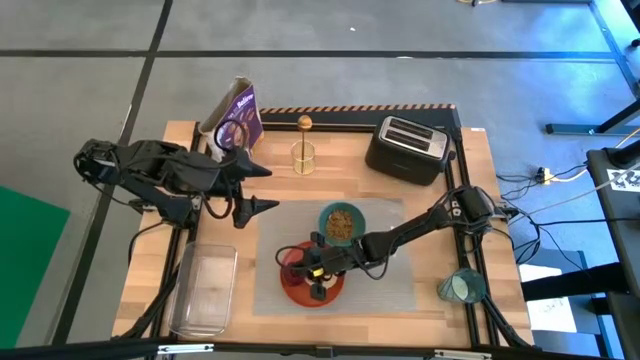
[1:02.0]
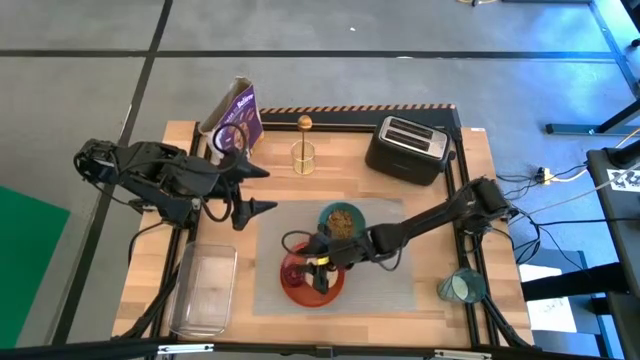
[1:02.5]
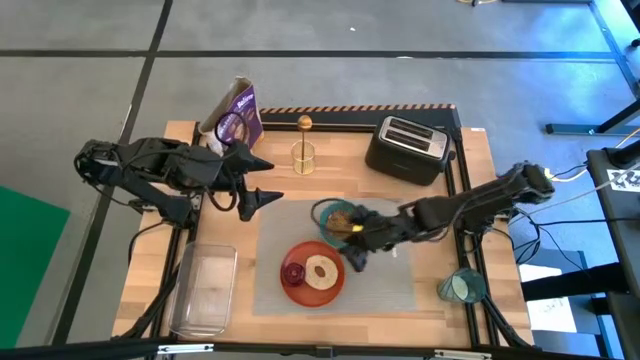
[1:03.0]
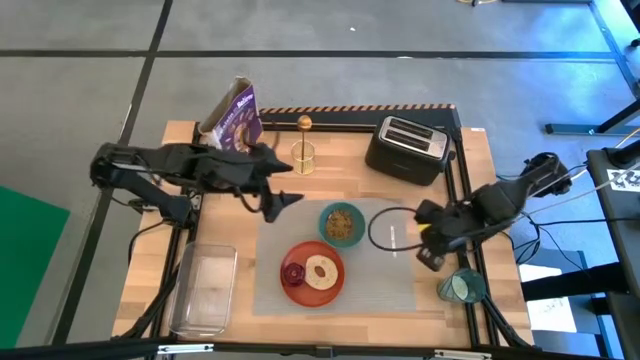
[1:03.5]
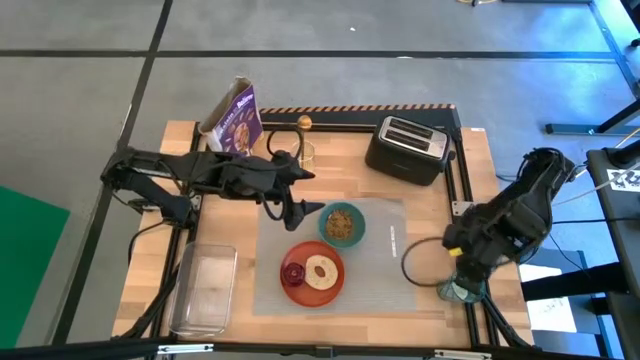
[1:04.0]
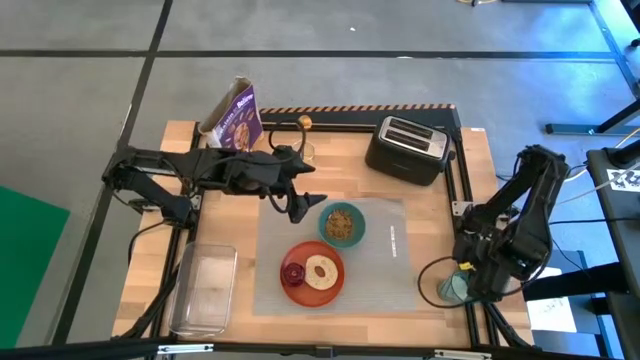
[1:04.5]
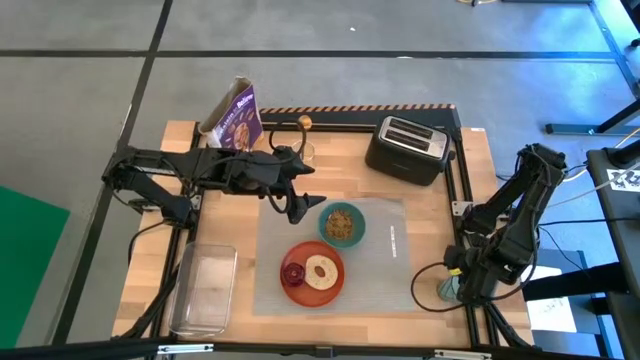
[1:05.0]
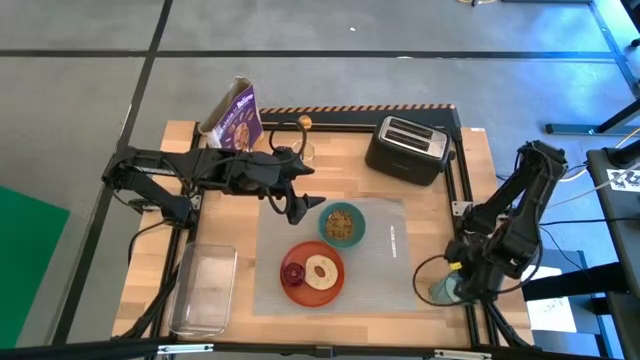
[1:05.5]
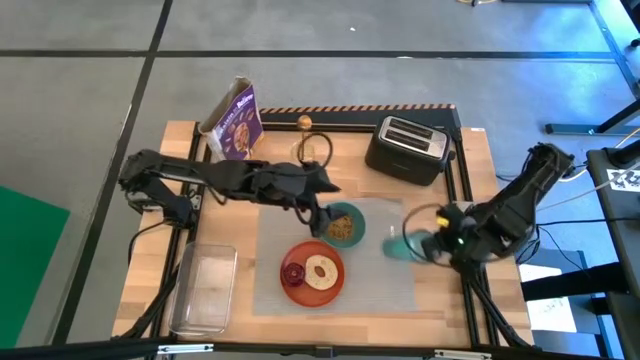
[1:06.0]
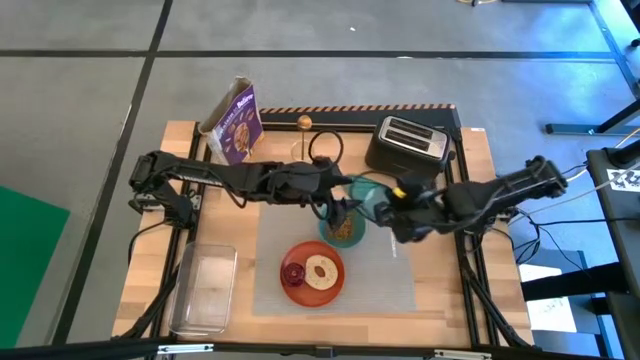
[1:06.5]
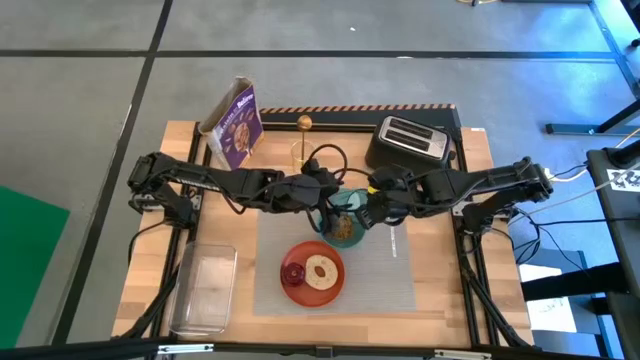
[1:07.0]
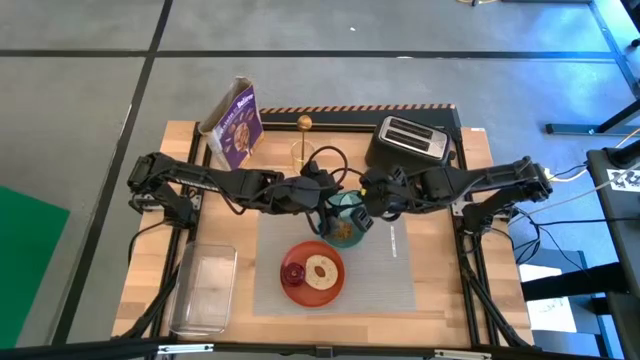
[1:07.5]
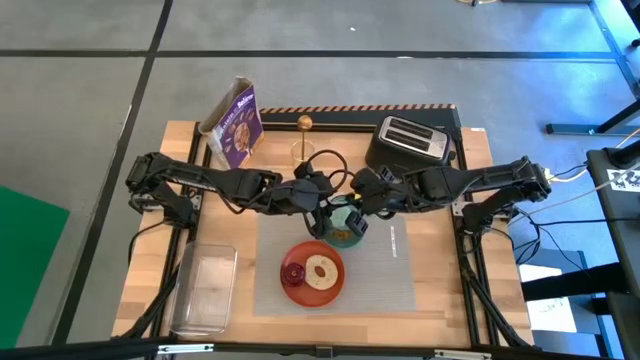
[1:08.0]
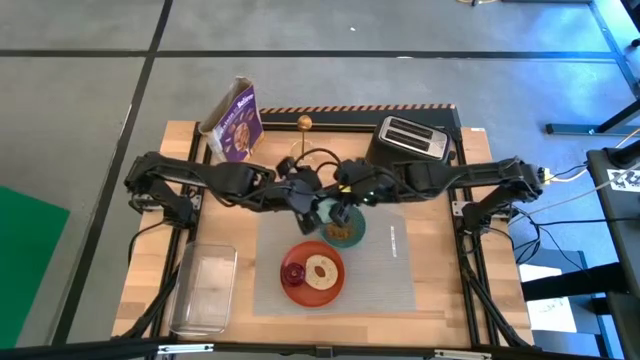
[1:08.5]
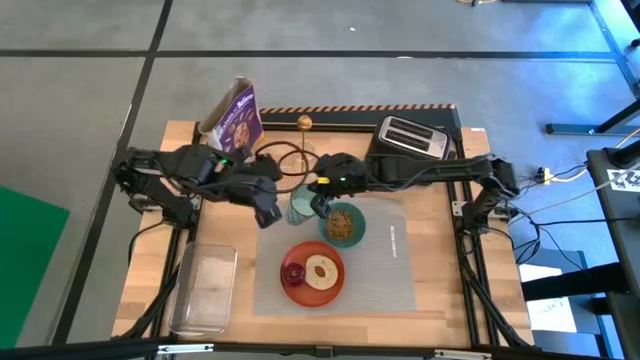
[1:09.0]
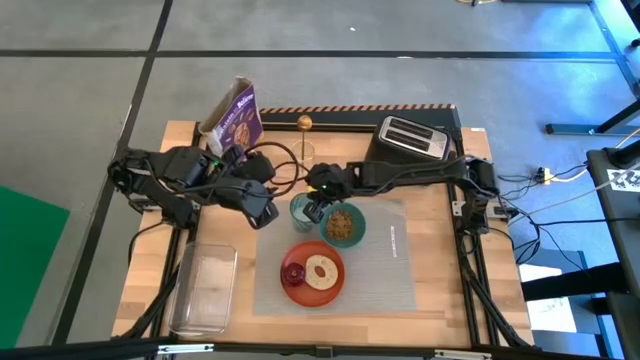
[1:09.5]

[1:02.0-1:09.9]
Task: Arrange a breakfast setting
Put the cup of grain rice on the table mat

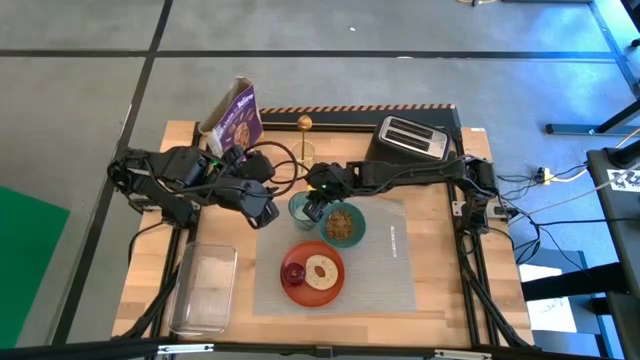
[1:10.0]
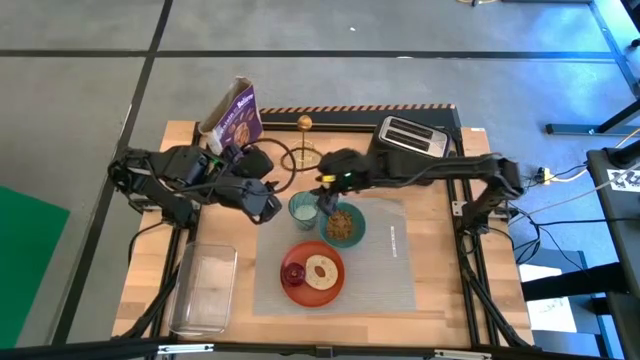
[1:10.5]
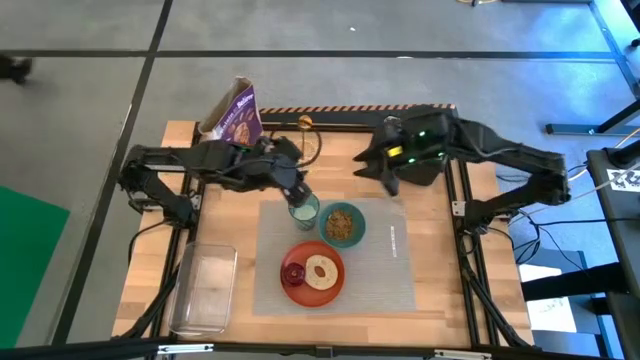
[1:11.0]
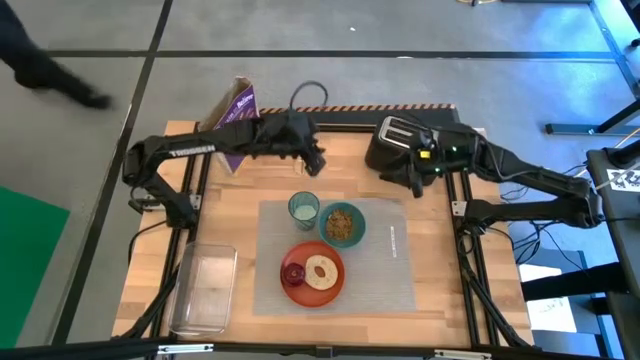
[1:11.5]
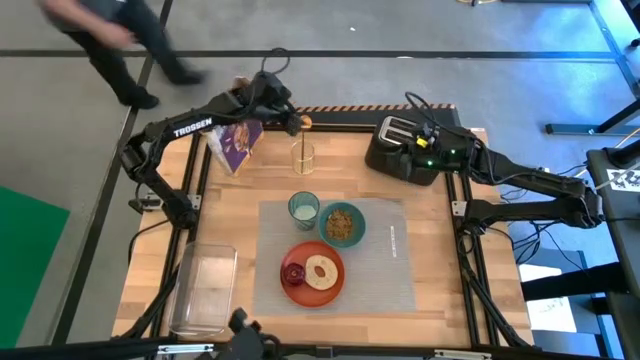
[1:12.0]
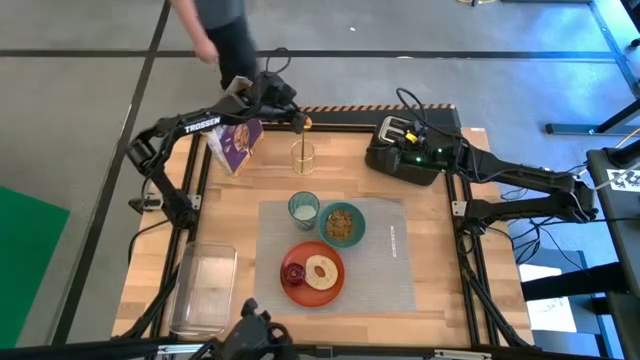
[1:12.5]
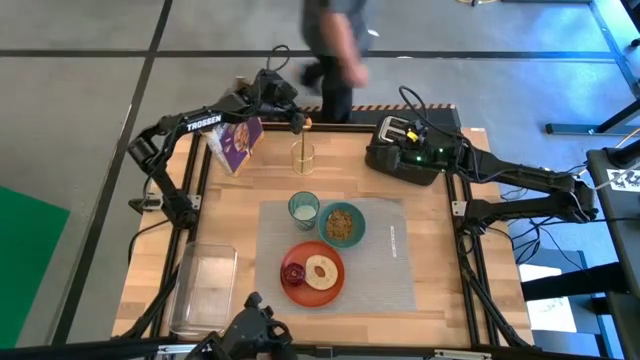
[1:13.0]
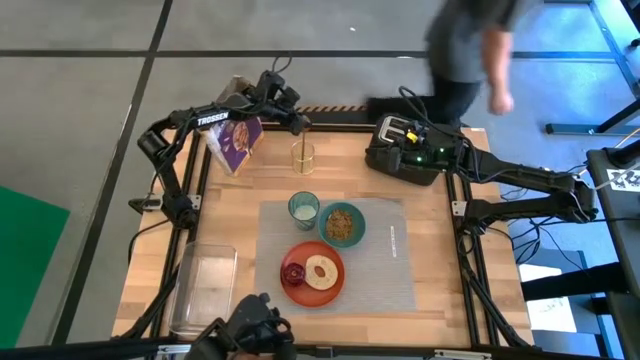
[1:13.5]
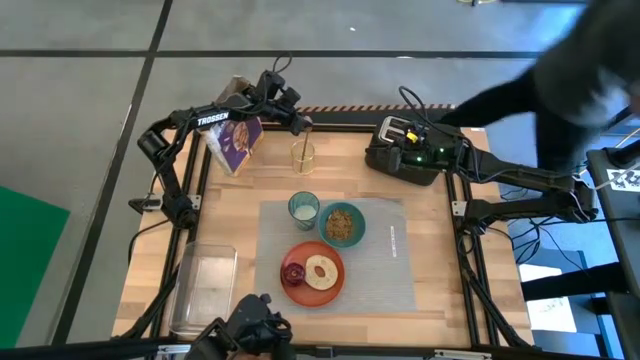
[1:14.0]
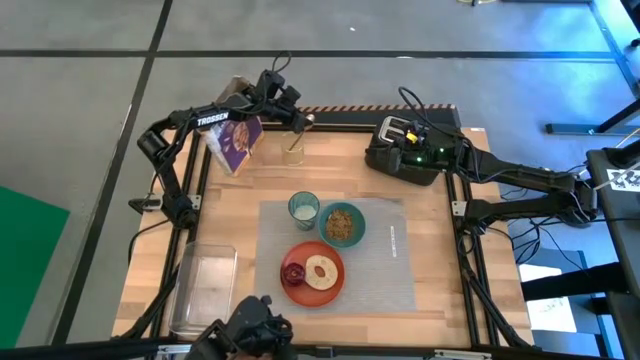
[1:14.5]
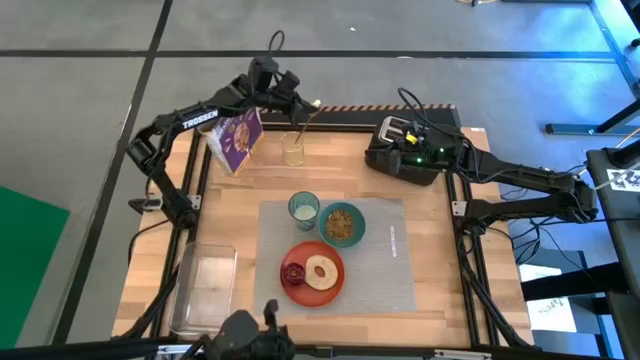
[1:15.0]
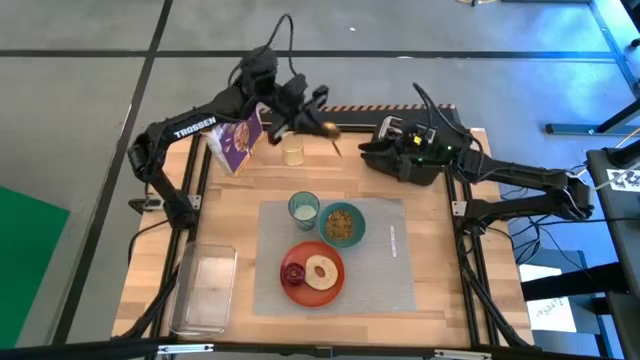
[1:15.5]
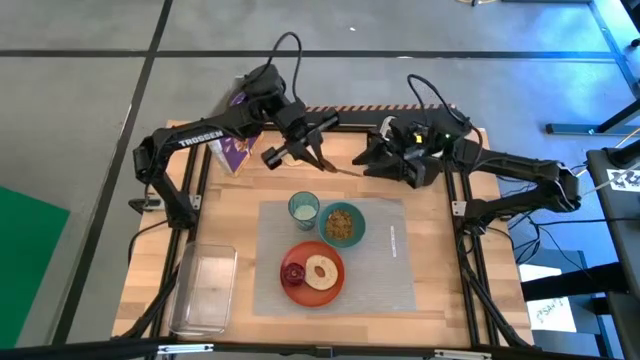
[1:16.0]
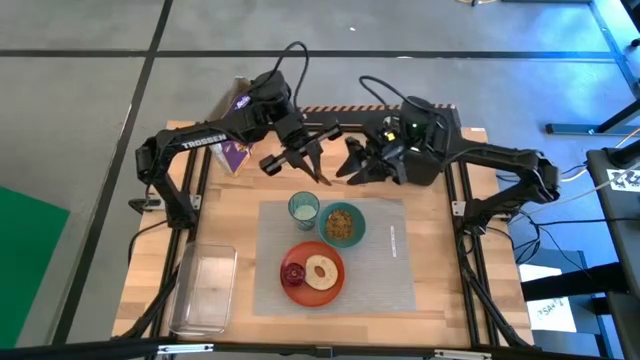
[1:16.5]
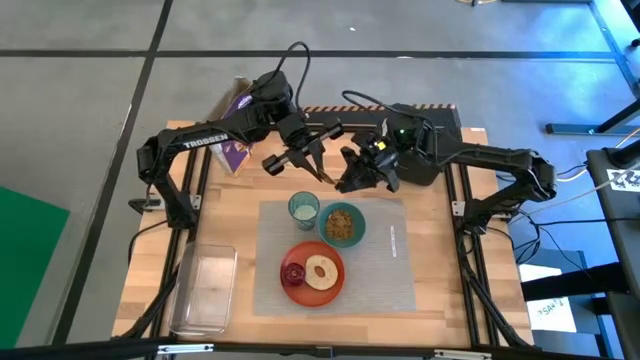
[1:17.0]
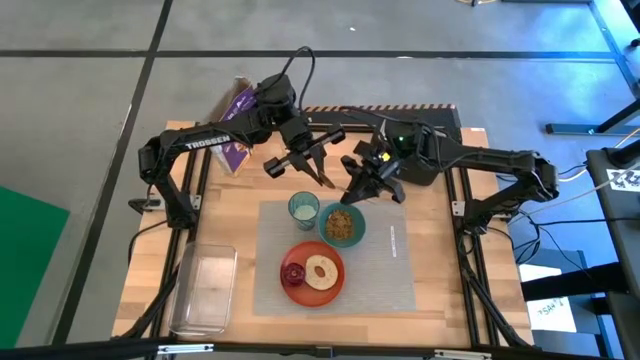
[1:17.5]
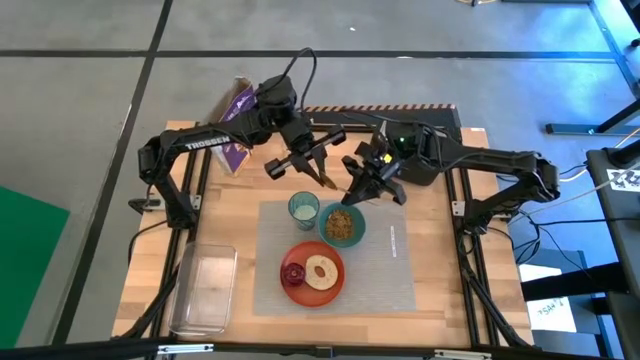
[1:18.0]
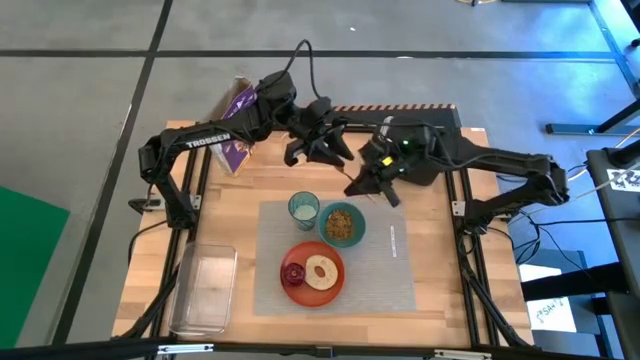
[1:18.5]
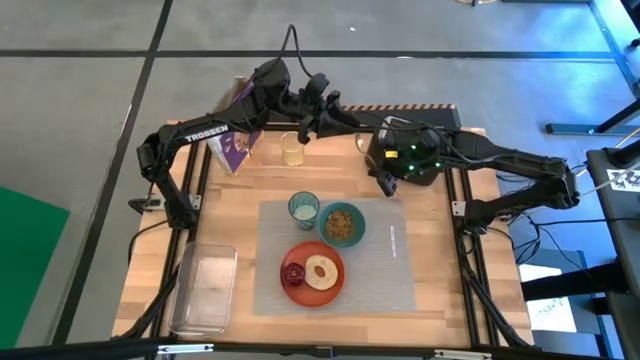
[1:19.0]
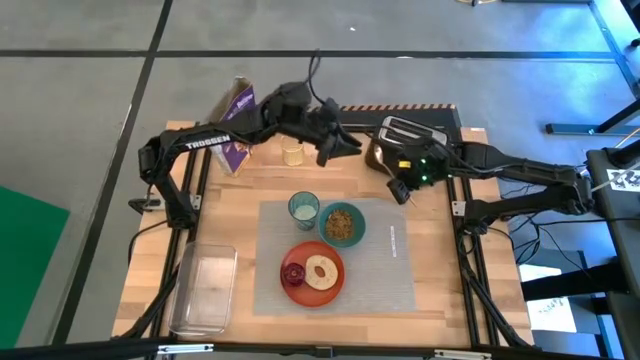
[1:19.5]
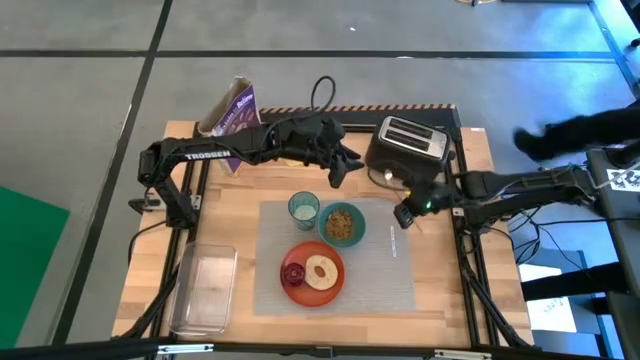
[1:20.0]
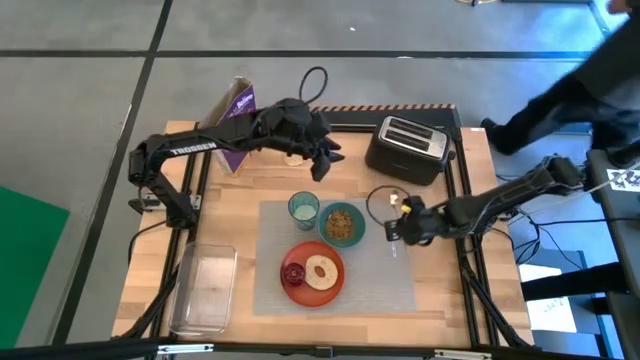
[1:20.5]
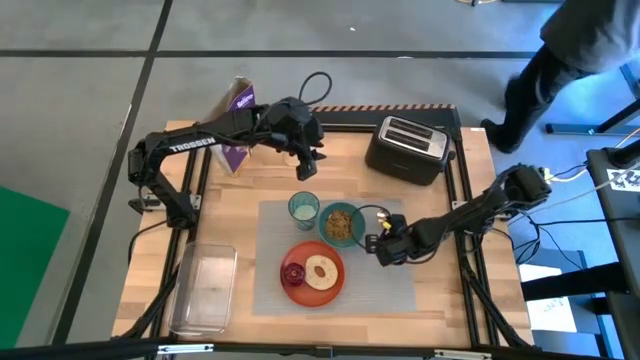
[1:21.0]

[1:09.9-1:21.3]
Put the gold spoon on the table mat

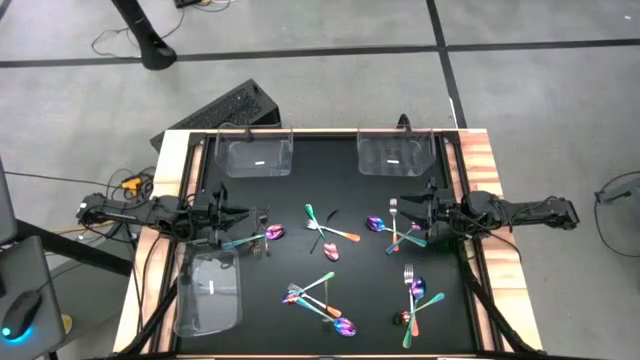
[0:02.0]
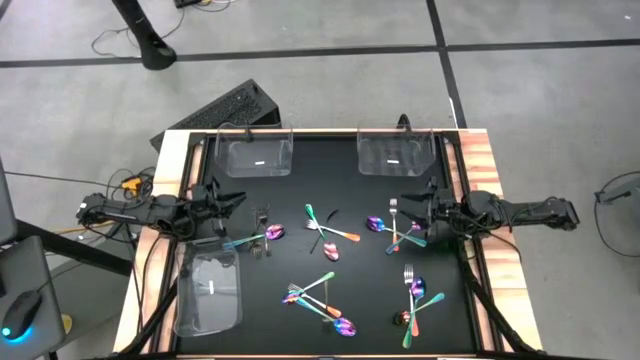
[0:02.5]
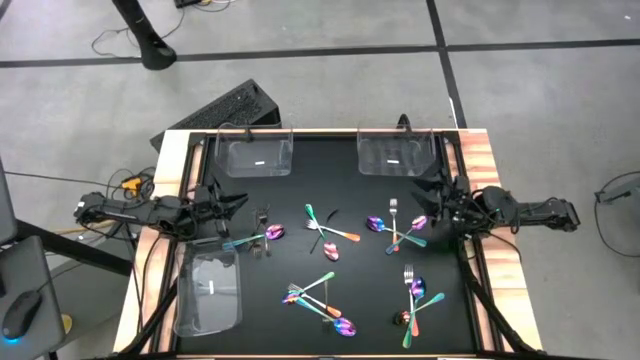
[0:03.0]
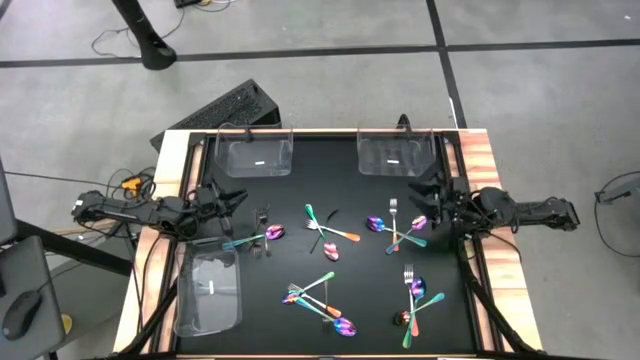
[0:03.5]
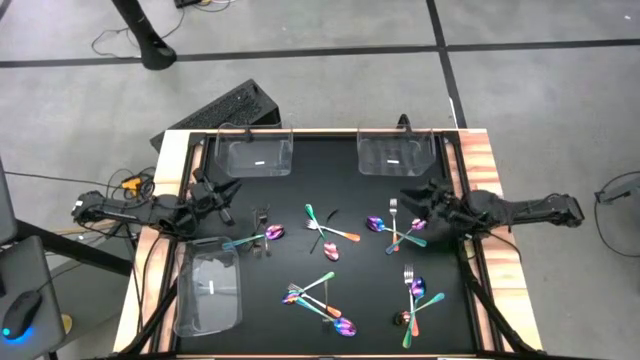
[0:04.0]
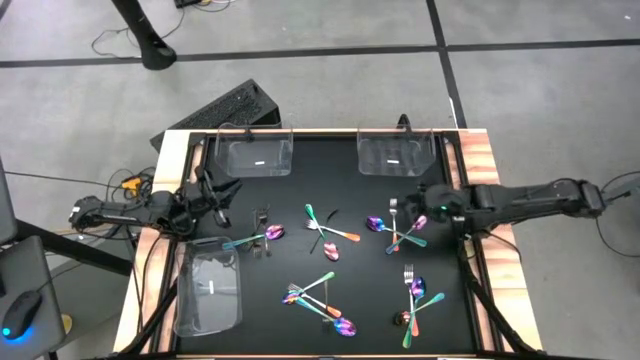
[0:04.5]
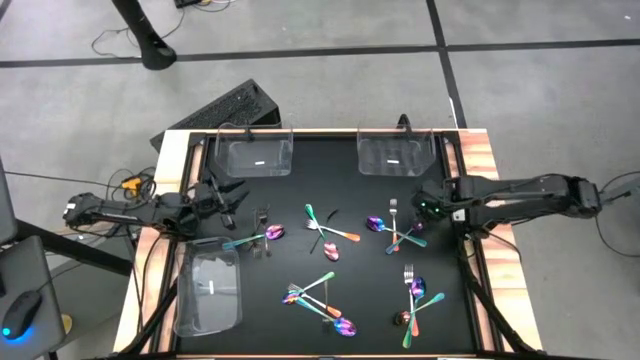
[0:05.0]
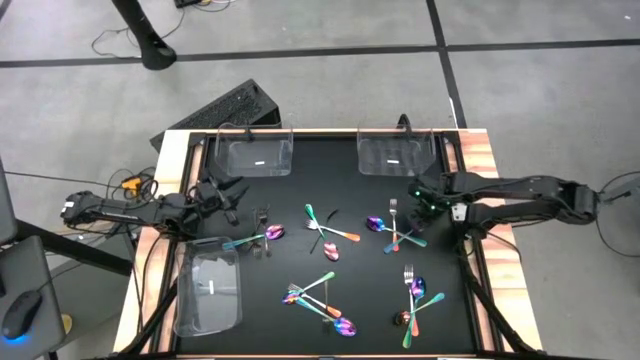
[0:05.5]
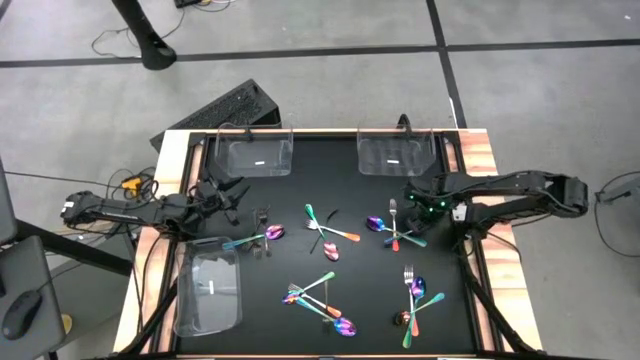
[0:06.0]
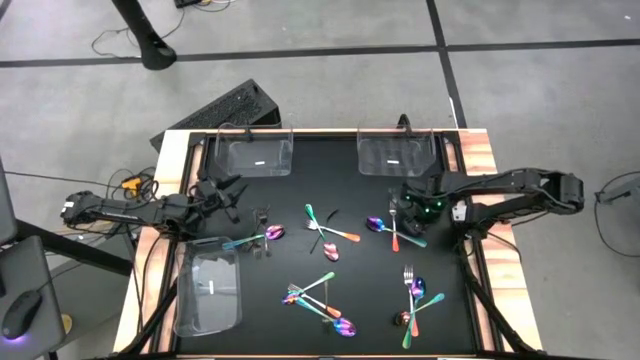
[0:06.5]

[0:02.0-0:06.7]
Task: Sort silverware by color (type)
Put the blue spoon into top right transparent bin
